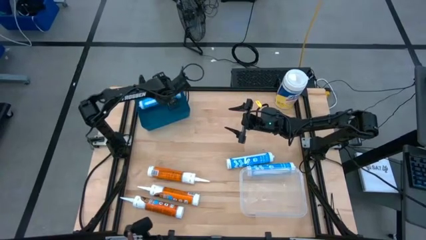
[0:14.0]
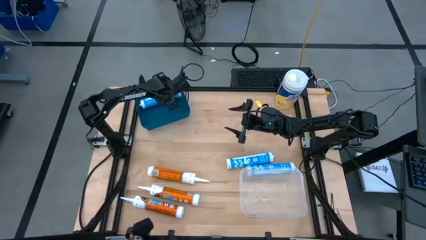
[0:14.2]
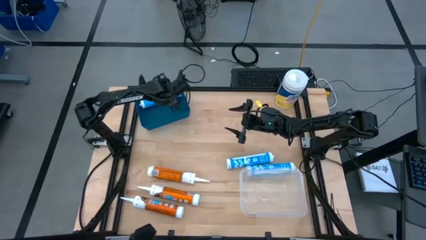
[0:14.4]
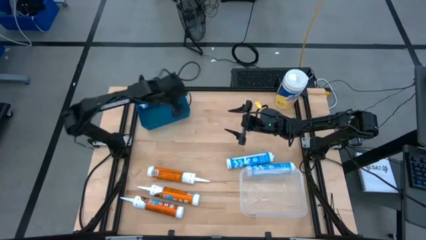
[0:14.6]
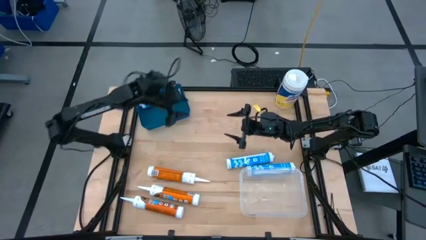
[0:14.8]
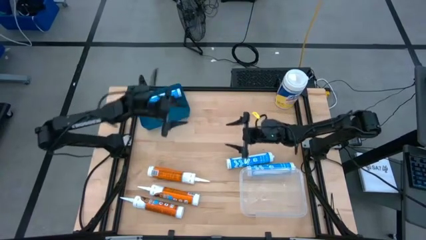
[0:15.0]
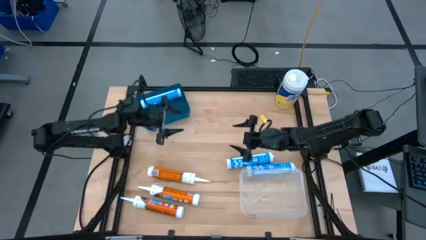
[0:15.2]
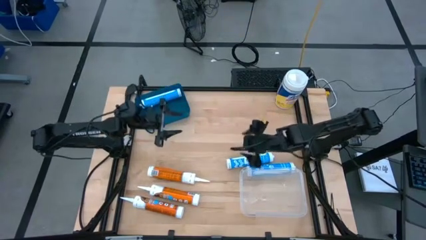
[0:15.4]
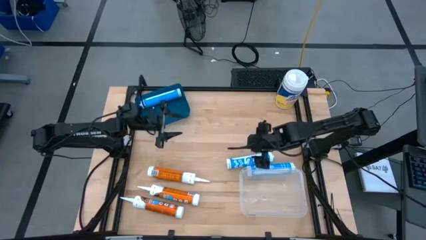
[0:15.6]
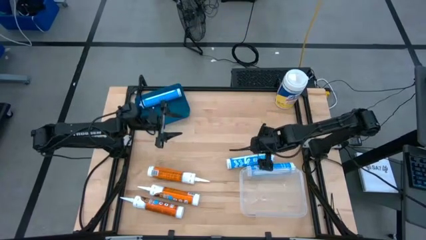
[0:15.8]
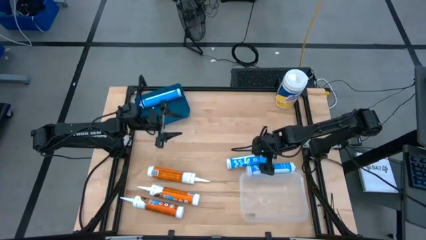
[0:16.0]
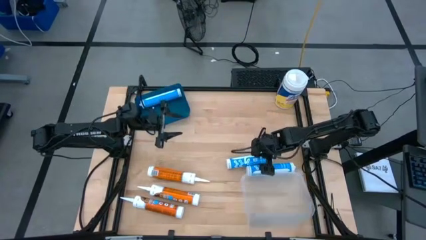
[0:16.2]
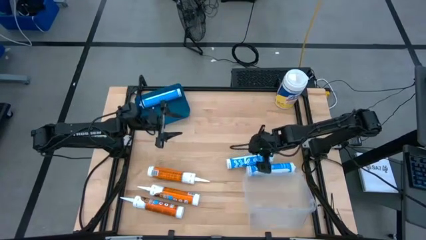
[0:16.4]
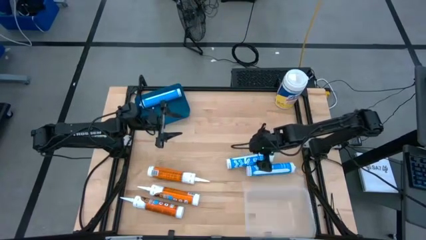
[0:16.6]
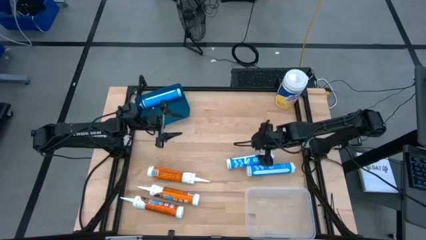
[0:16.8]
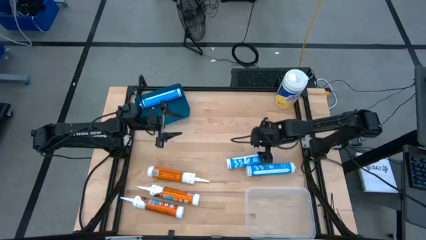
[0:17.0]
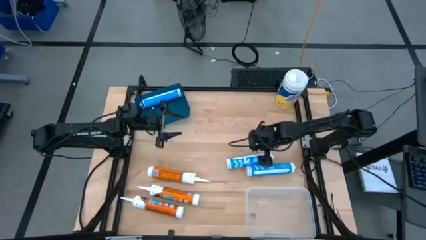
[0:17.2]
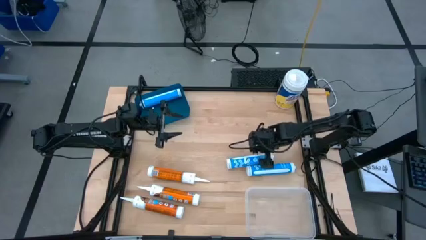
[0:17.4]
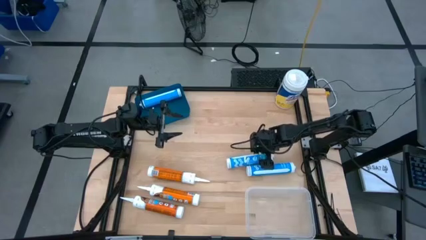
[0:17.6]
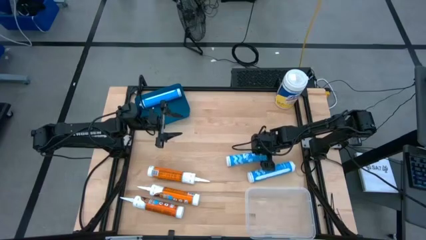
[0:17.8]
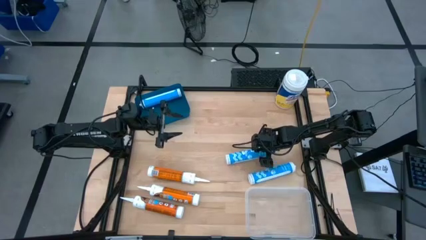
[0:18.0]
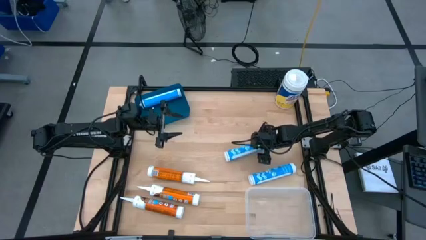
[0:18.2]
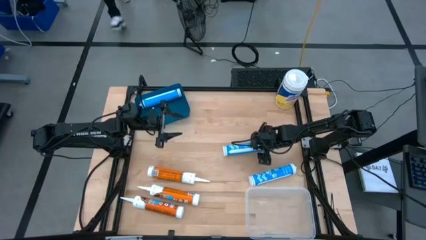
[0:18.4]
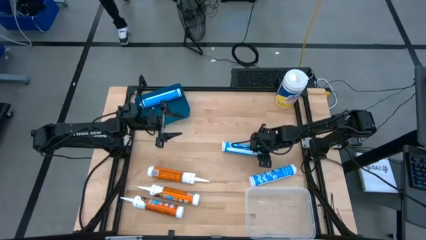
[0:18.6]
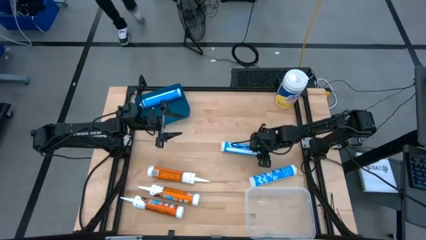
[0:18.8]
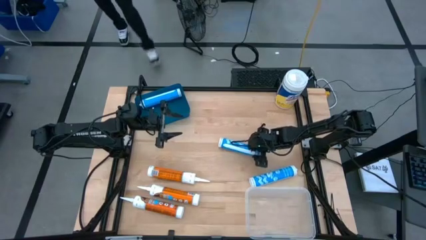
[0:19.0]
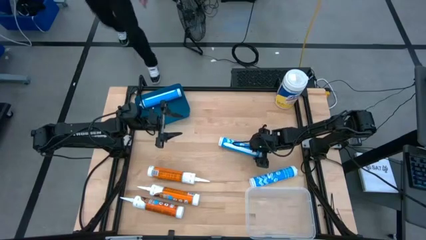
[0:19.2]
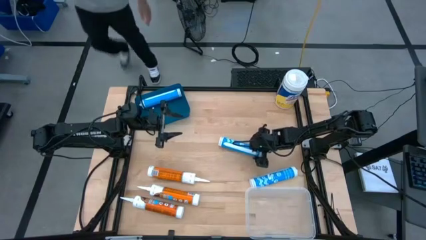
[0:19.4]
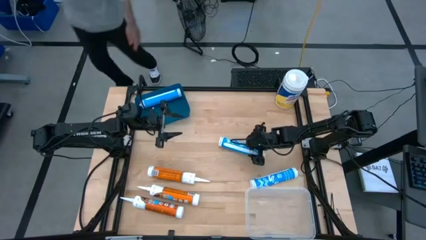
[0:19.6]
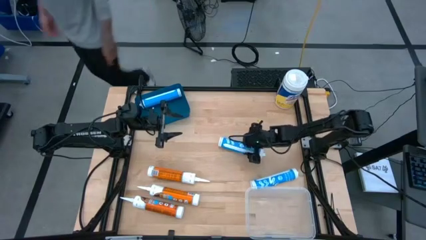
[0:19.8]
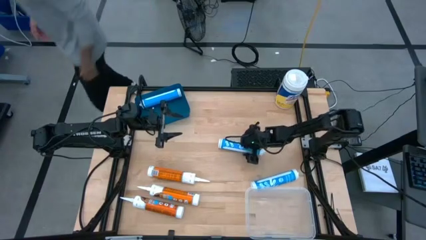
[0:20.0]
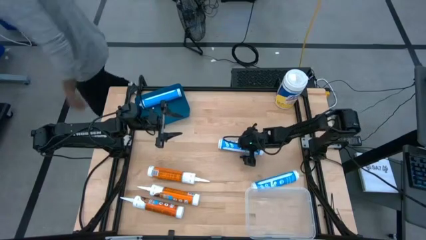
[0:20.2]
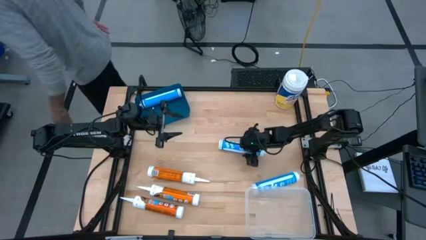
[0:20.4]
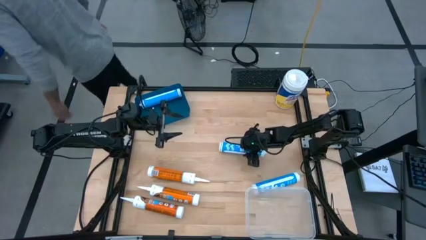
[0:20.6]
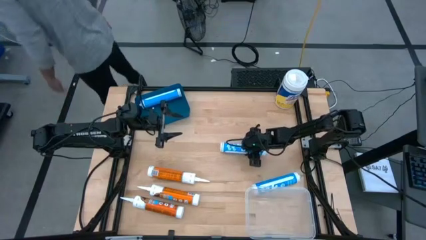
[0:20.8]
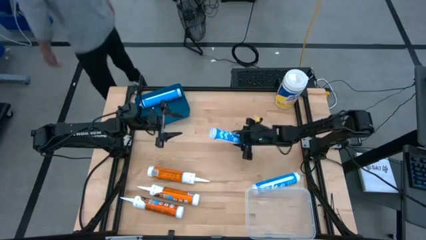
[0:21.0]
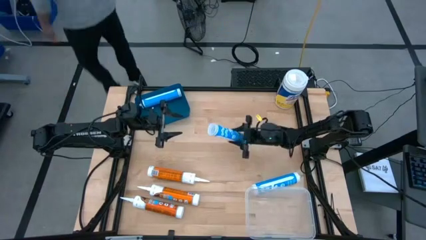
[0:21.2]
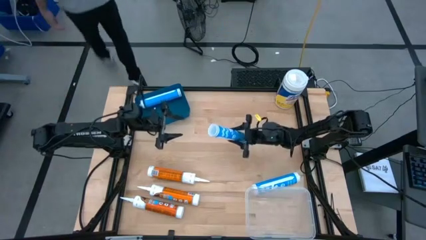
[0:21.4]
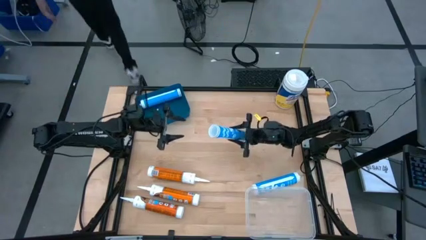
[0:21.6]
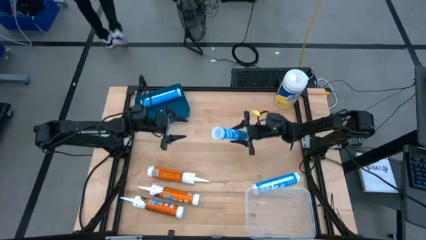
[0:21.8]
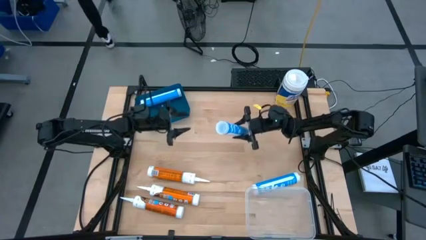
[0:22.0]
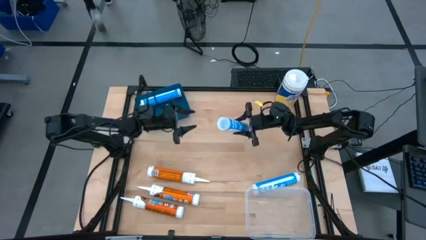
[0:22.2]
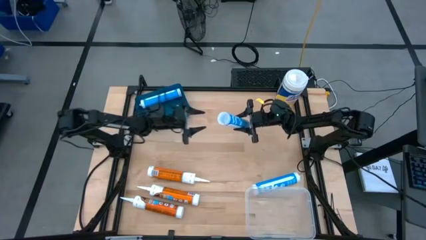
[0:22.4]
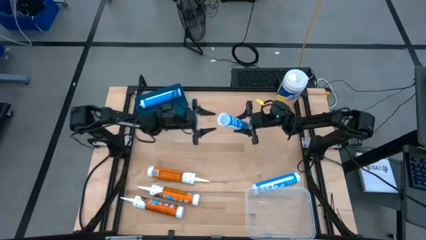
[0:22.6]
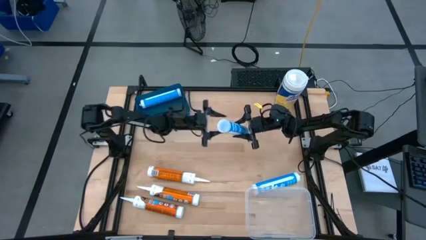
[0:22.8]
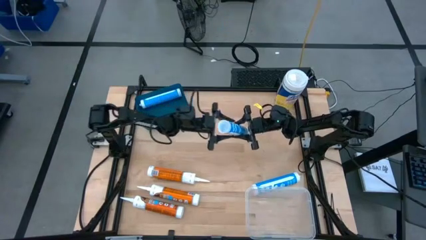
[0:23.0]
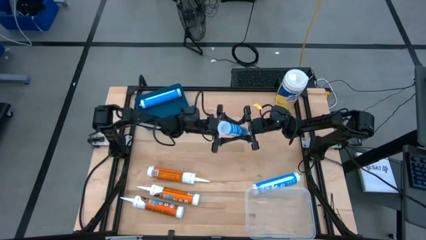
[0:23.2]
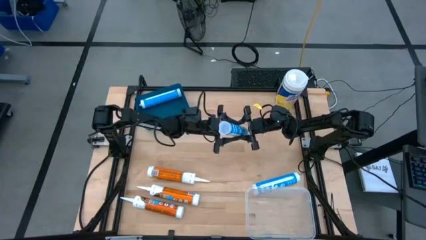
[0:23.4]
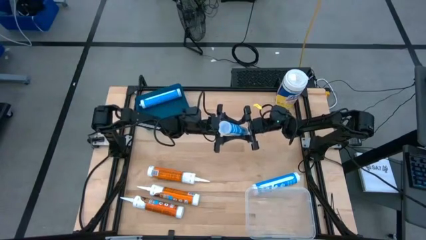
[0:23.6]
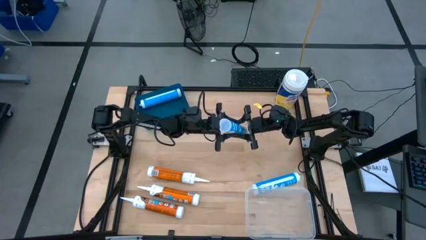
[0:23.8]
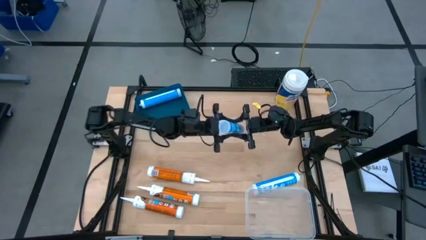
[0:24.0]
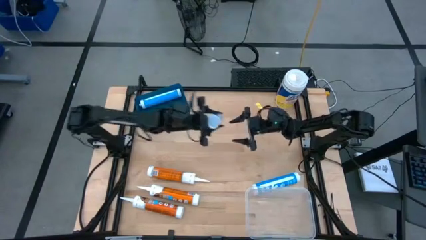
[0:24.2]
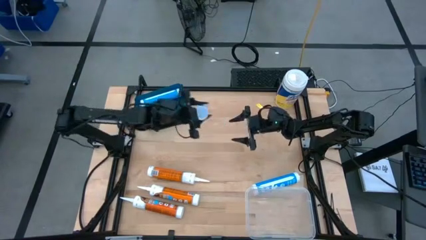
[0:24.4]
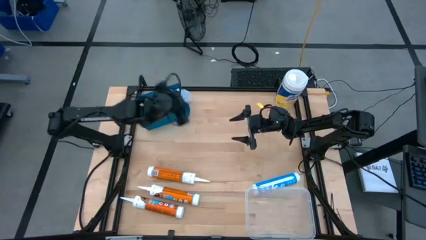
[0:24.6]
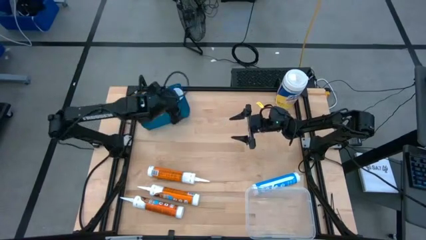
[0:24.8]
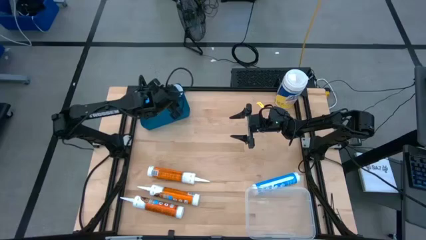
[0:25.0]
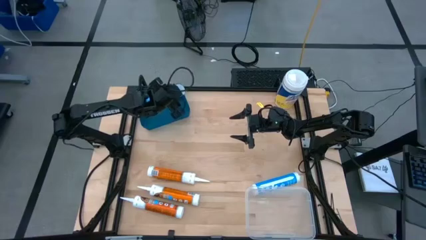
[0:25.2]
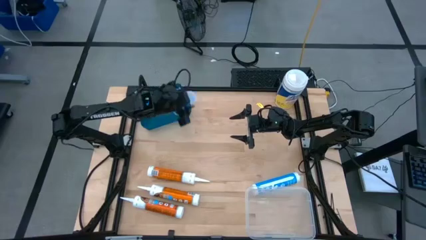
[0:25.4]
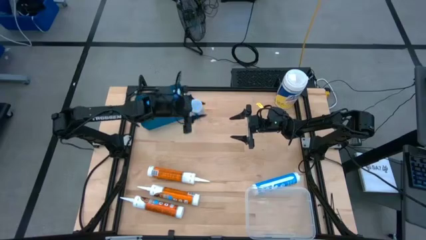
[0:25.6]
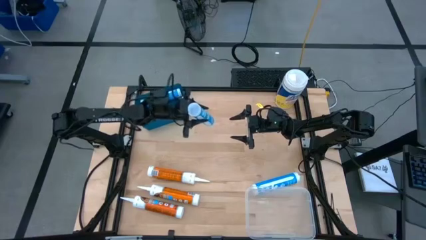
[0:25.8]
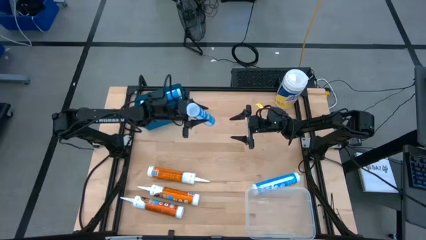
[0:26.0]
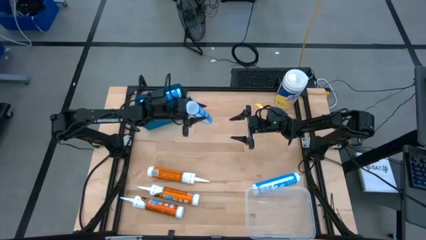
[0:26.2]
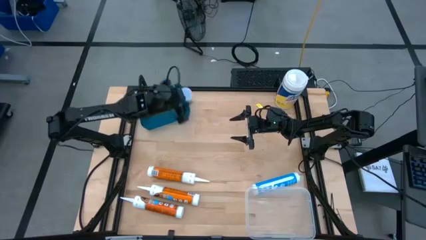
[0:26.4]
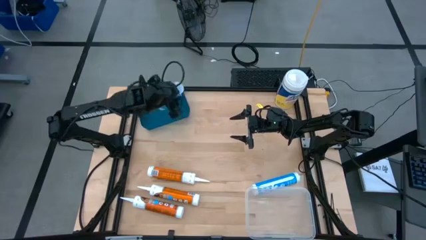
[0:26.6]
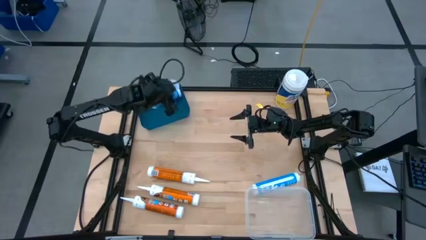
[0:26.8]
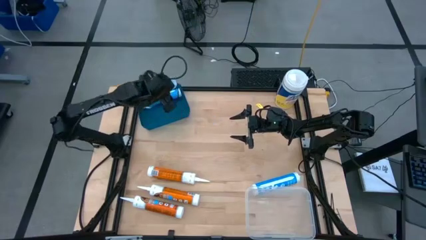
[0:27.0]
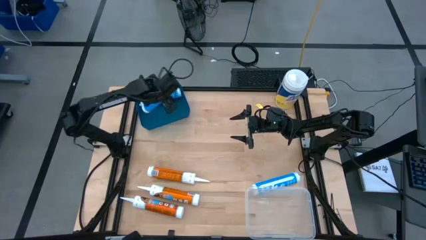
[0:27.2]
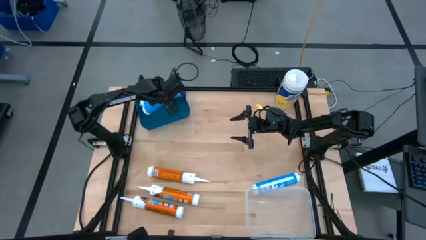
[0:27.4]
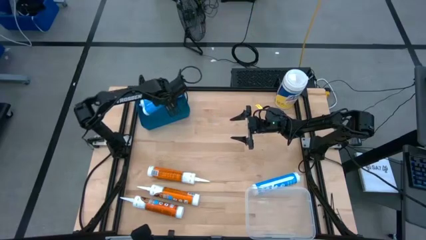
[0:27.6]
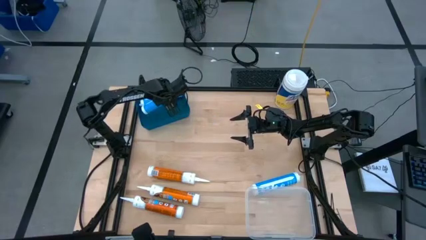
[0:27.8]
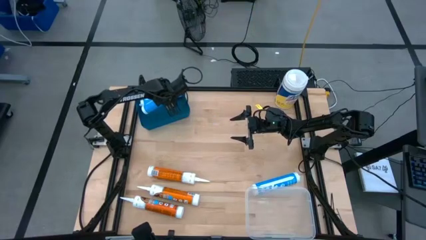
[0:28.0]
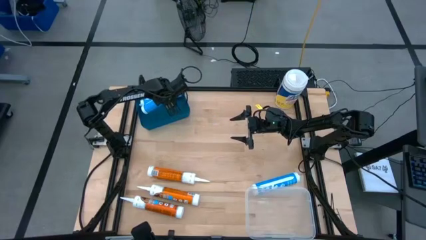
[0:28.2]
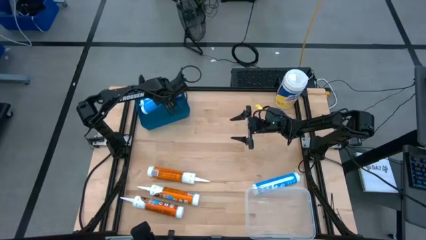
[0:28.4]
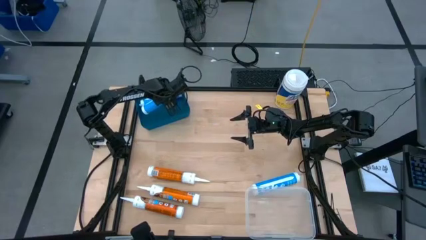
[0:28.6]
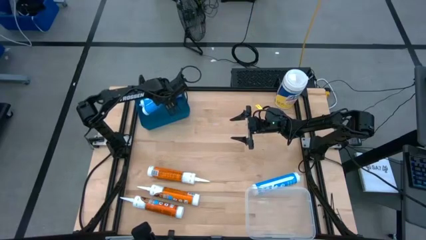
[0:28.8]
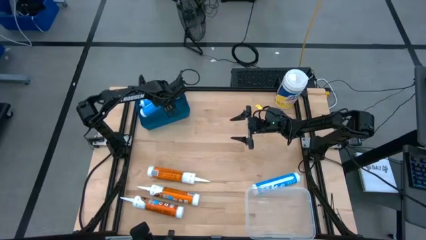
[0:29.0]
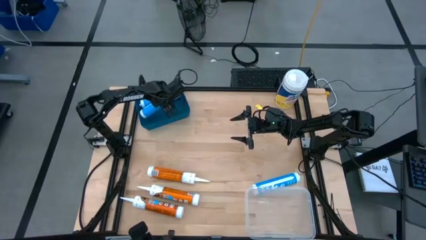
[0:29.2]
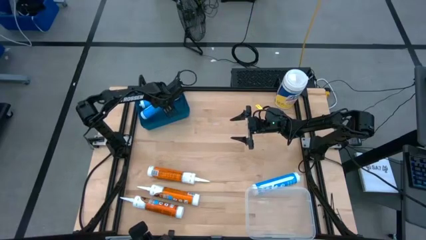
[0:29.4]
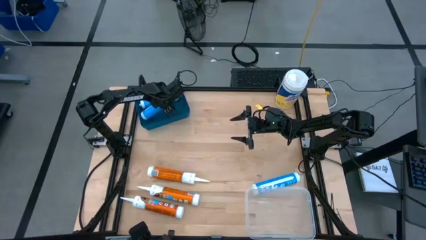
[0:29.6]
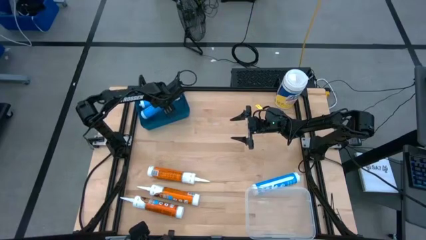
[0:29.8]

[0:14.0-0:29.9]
Task: Pick & place silicon tubes, Sealant and Lysol wipes
Put the top blue sealant into the blue bin
